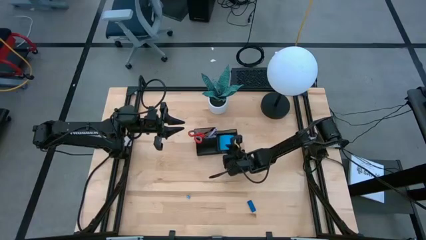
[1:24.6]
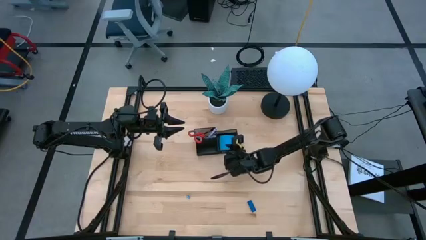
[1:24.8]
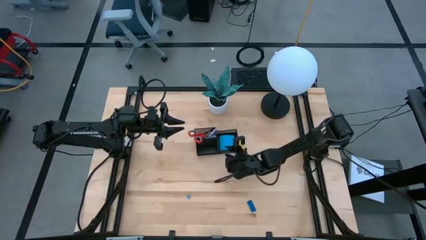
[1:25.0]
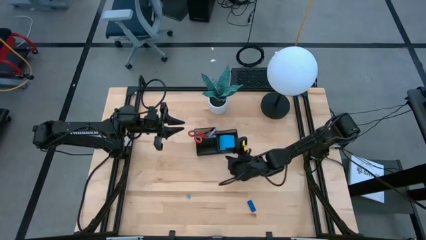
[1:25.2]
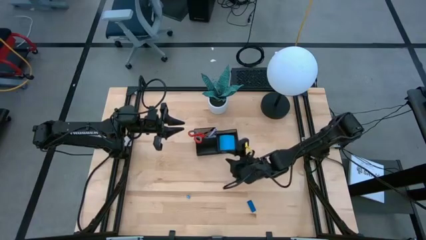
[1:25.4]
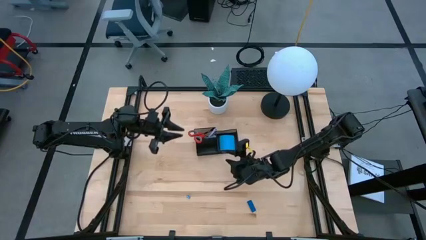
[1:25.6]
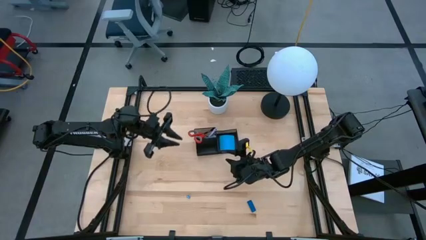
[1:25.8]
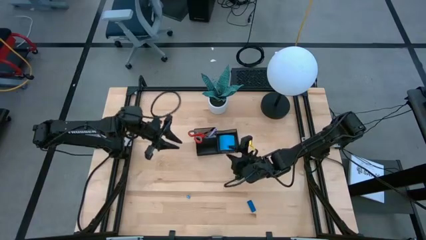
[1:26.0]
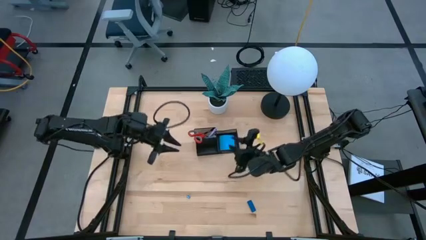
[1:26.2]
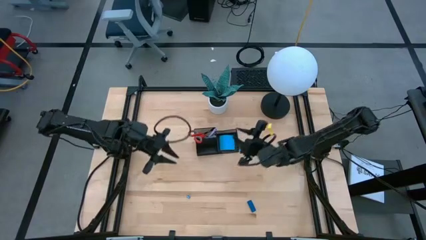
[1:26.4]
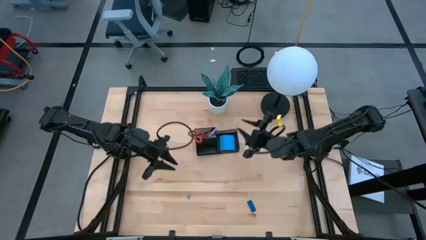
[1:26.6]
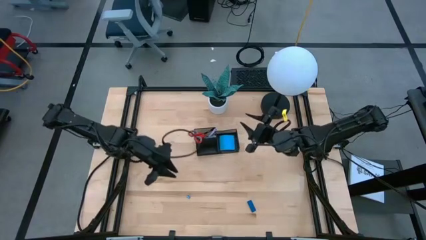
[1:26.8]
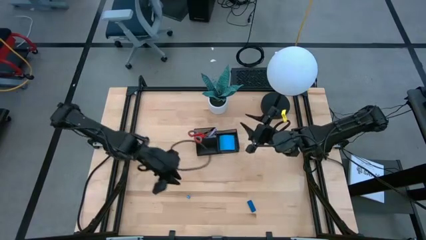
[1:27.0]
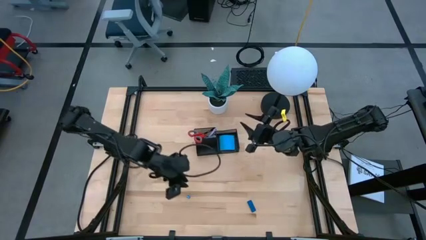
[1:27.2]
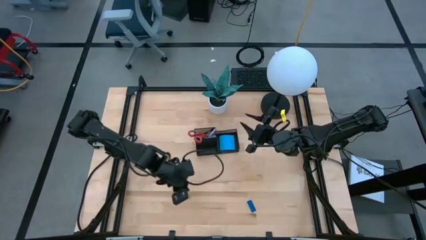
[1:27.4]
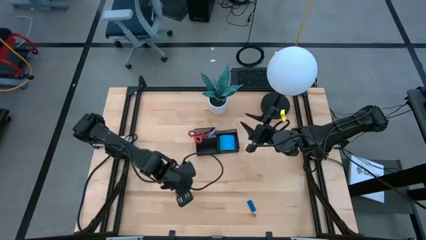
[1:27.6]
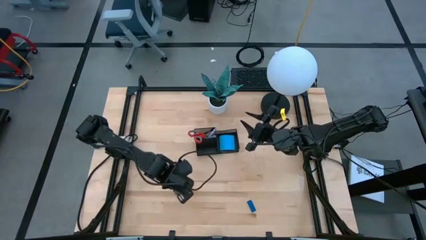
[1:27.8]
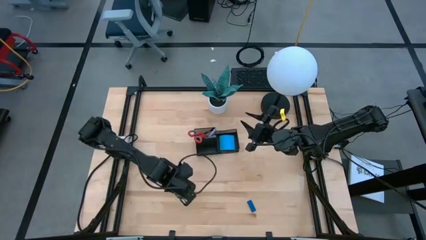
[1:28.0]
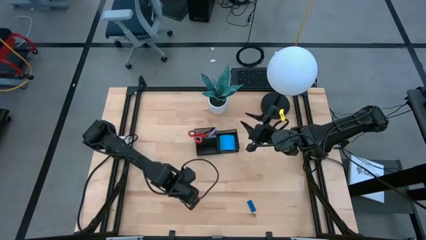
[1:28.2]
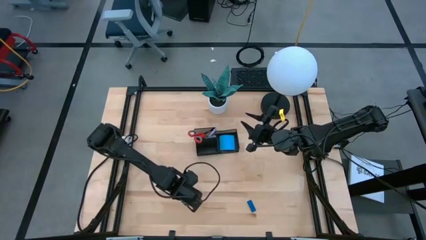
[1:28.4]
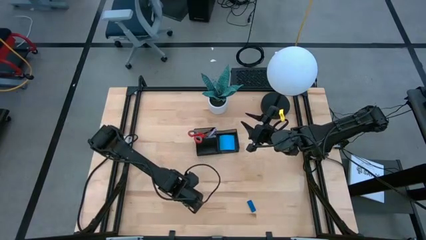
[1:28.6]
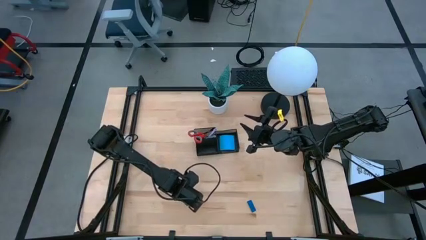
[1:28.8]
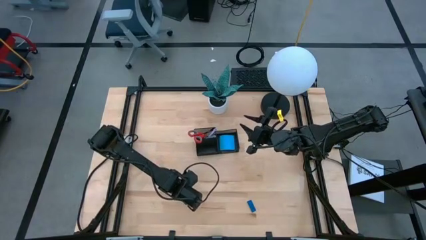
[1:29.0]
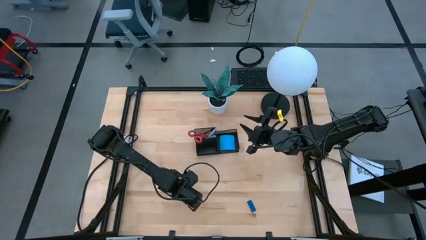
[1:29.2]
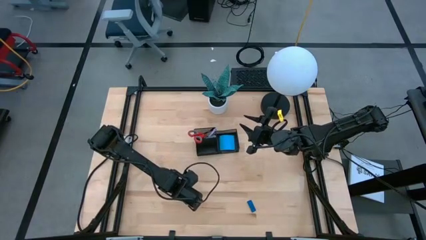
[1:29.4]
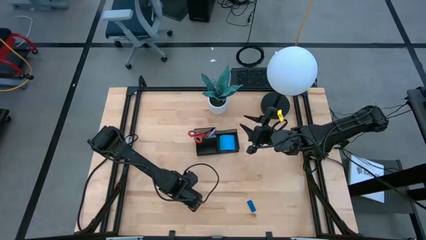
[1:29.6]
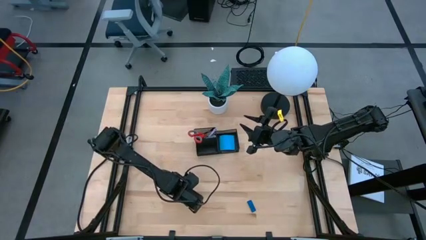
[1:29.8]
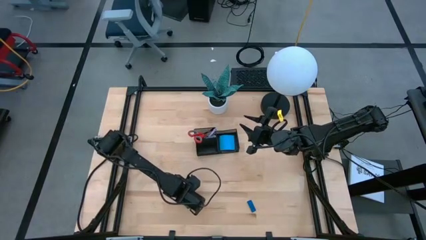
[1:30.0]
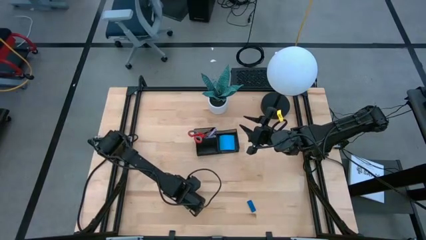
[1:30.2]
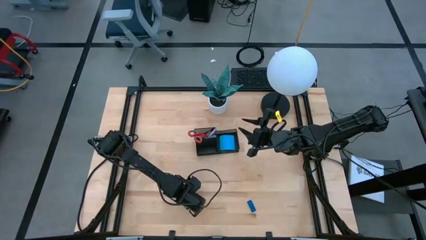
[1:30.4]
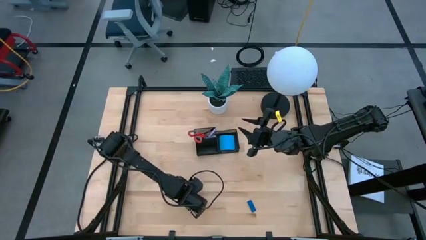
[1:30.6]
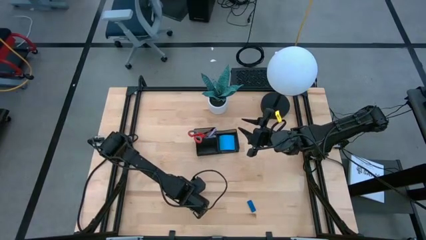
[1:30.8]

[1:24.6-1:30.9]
Task: Pick and place office supplies into organizer
Put the blue binder clip into the bottom left section of the desk organizer

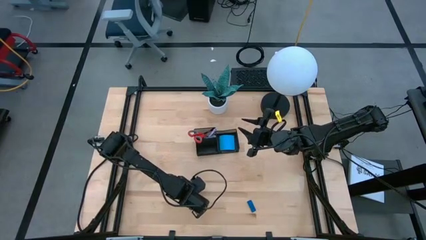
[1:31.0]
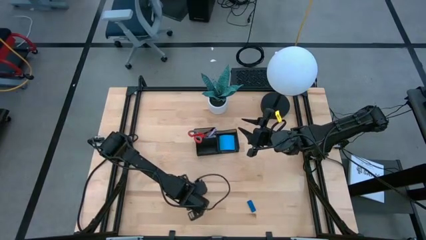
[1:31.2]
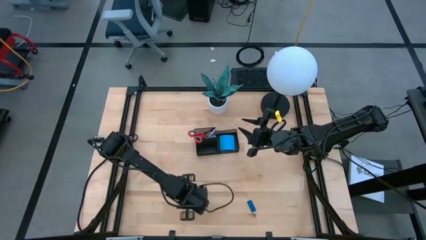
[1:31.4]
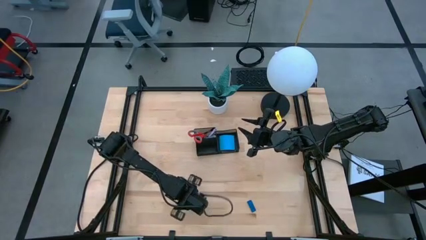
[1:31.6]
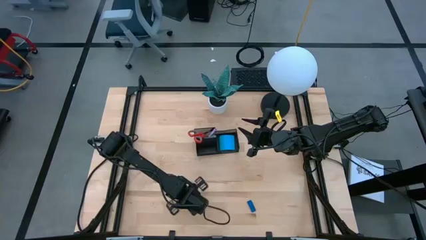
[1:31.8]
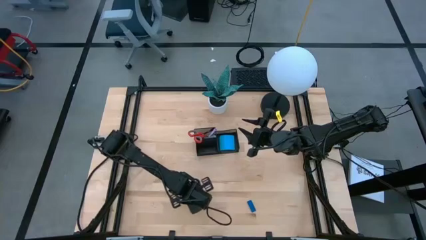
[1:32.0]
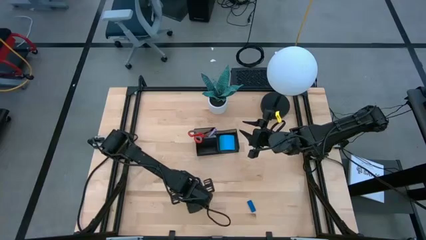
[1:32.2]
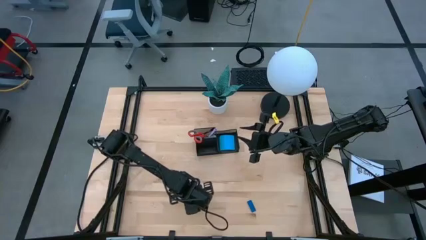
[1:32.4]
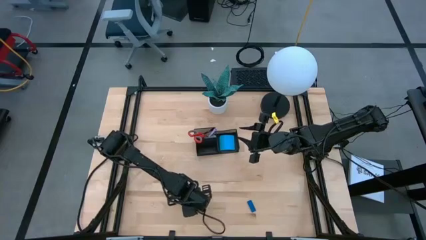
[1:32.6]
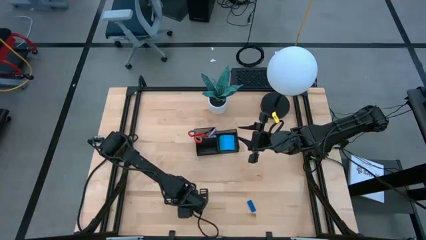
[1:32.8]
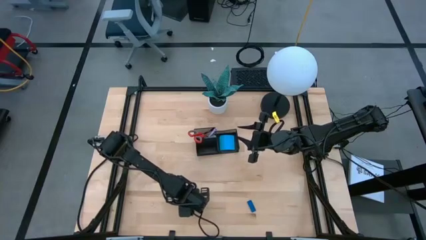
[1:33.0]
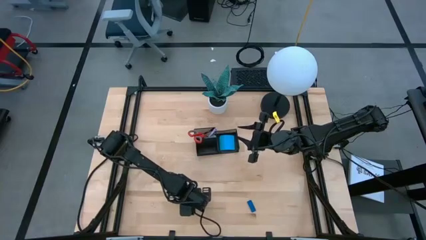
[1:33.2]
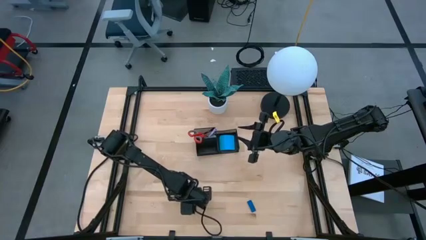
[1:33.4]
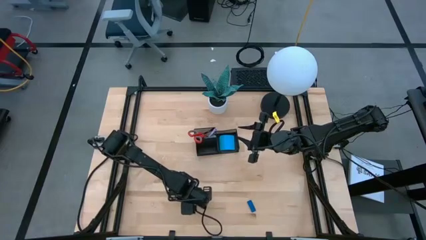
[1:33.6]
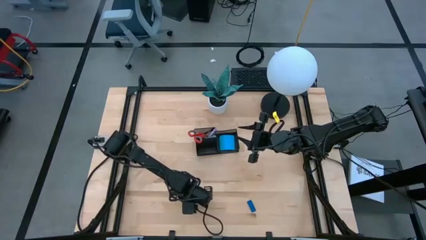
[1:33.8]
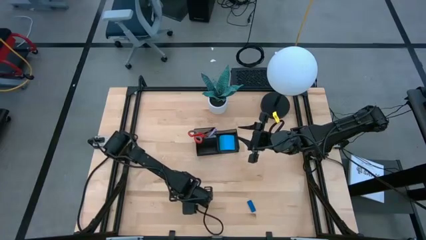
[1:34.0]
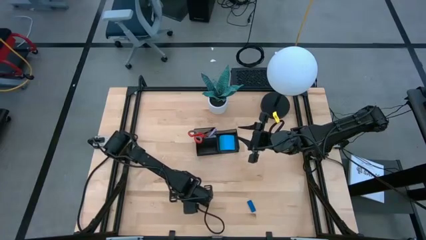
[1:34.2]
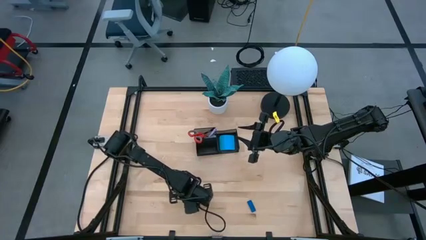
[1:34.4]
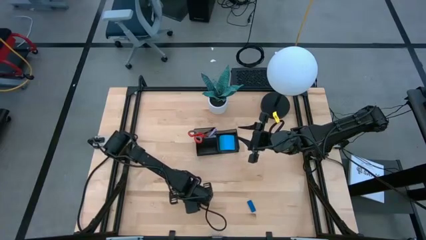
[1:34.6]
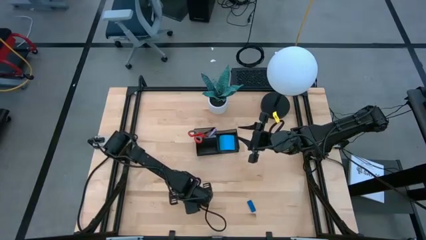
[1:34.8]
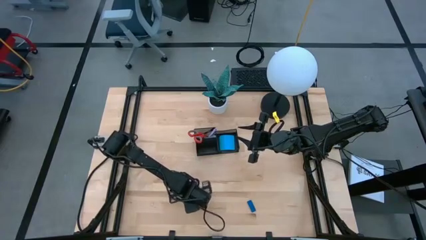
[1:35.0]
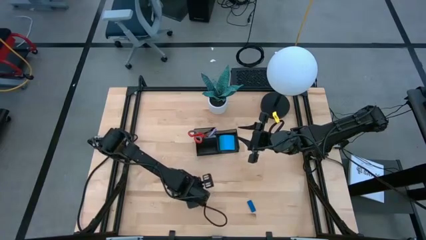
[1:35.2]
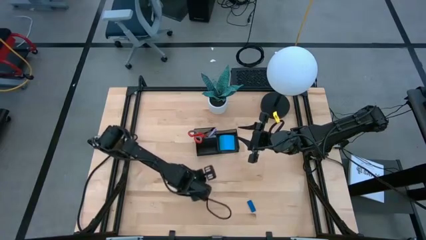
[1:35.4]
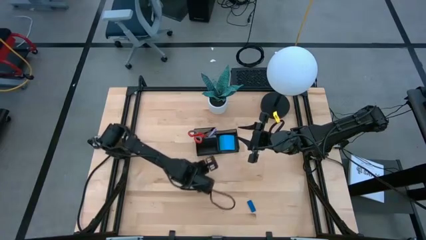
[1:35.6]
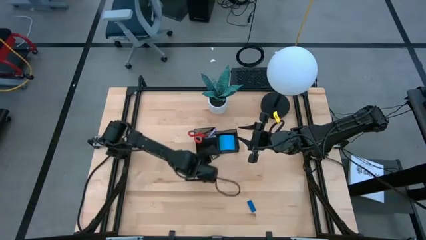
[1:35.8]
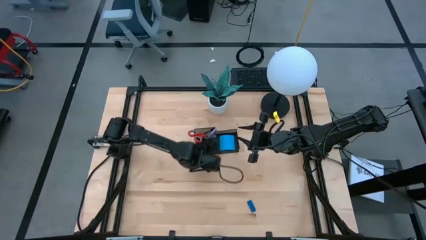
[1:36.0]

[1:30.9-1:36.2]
Put the blue binder clip into the bottom left section of the desk organizer
